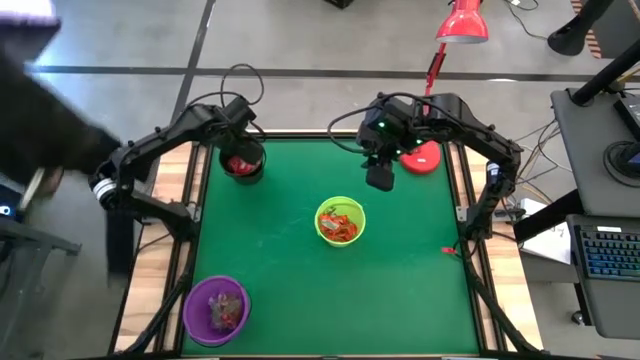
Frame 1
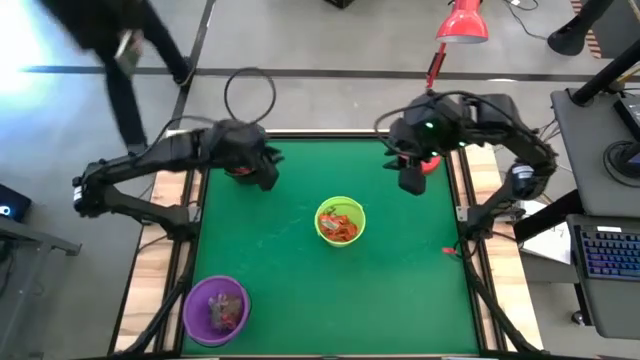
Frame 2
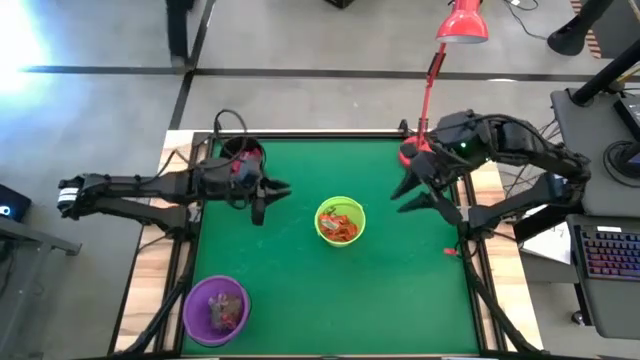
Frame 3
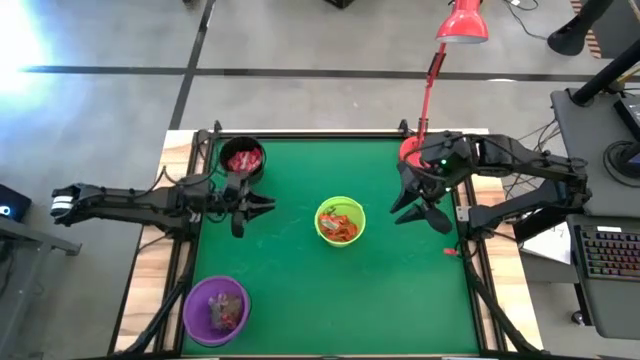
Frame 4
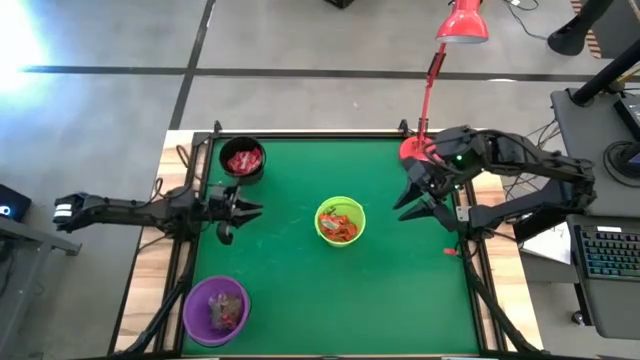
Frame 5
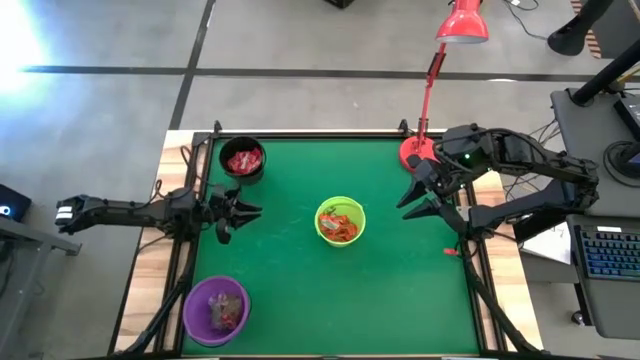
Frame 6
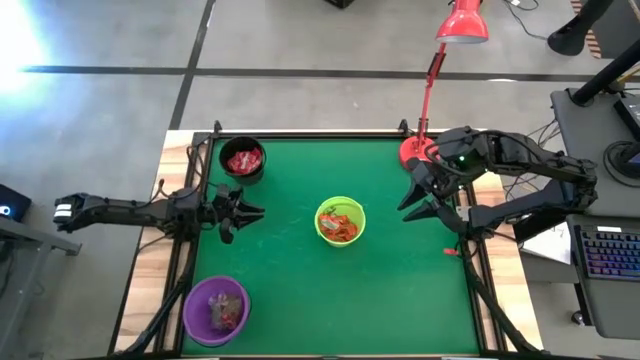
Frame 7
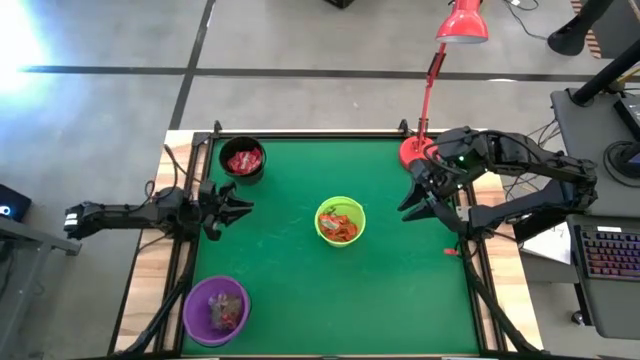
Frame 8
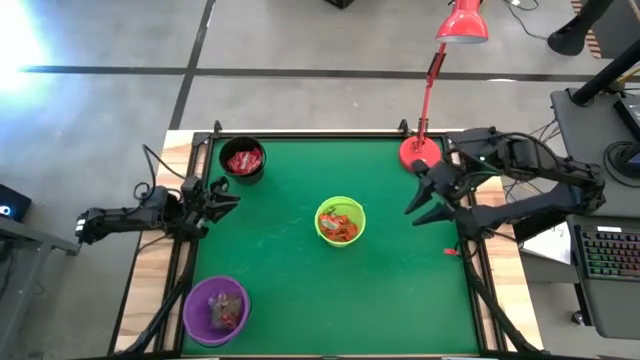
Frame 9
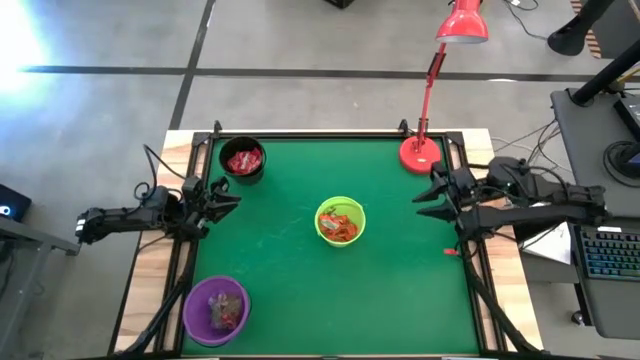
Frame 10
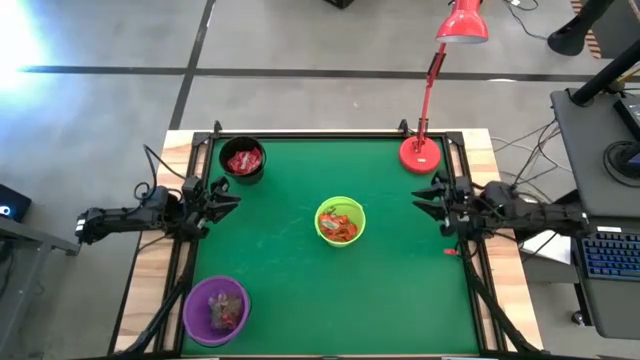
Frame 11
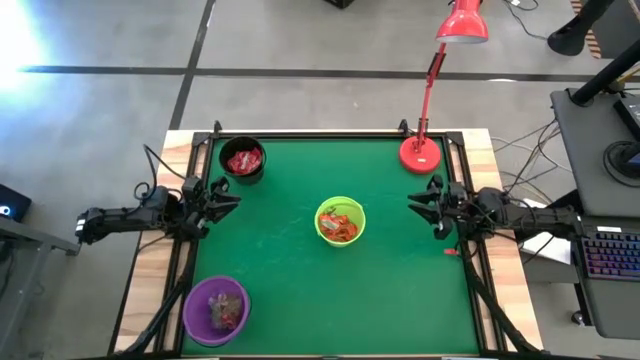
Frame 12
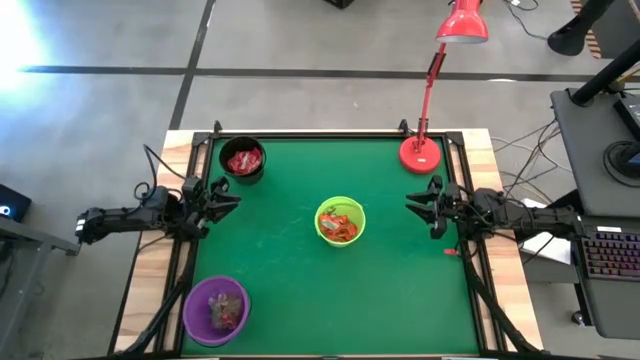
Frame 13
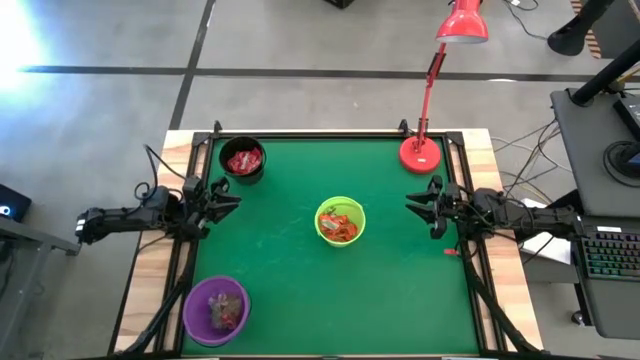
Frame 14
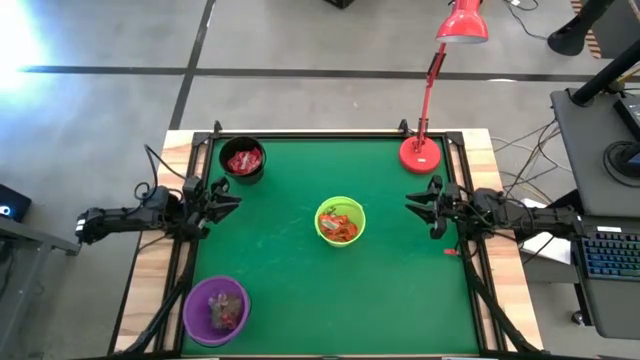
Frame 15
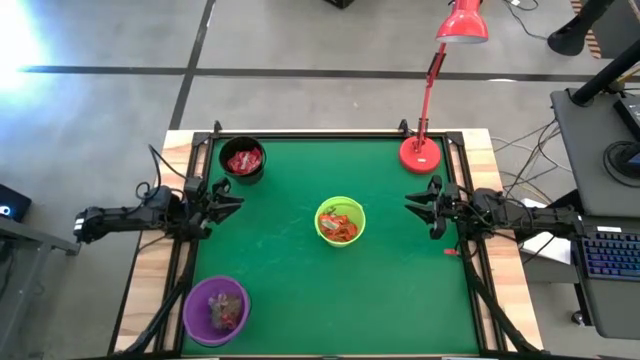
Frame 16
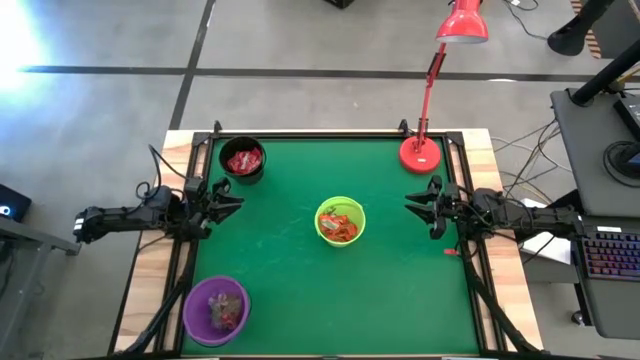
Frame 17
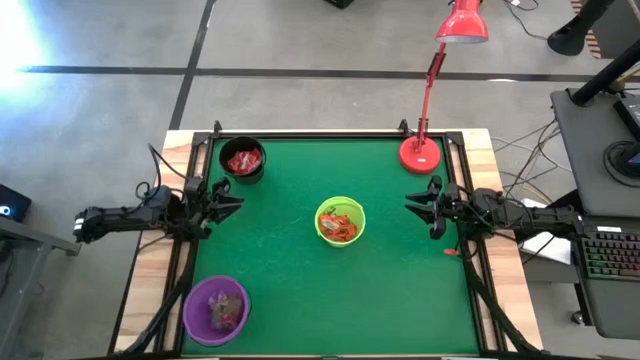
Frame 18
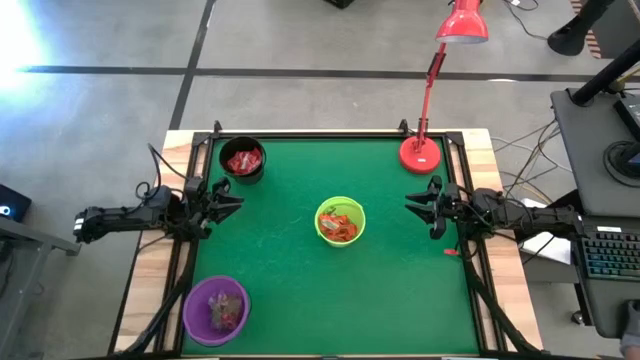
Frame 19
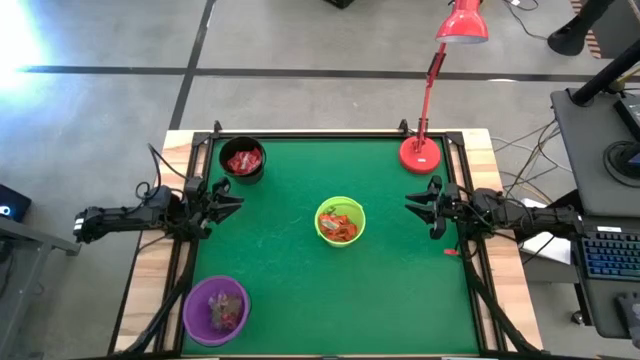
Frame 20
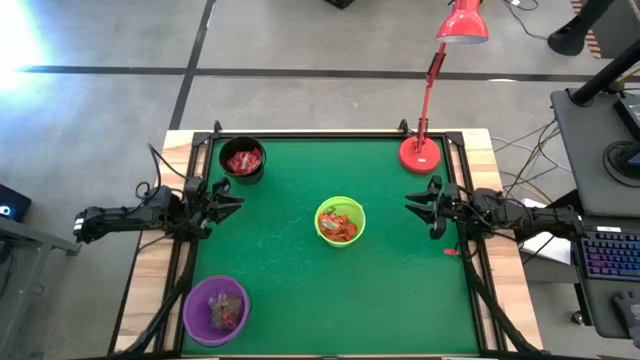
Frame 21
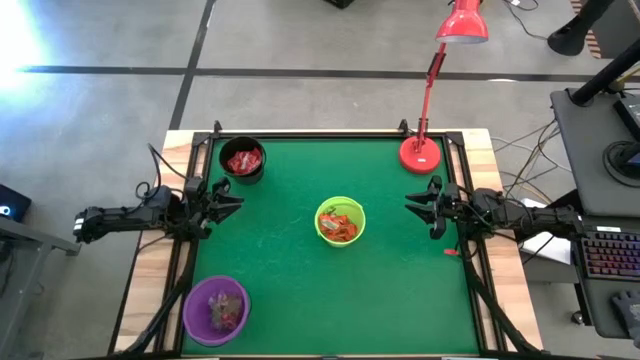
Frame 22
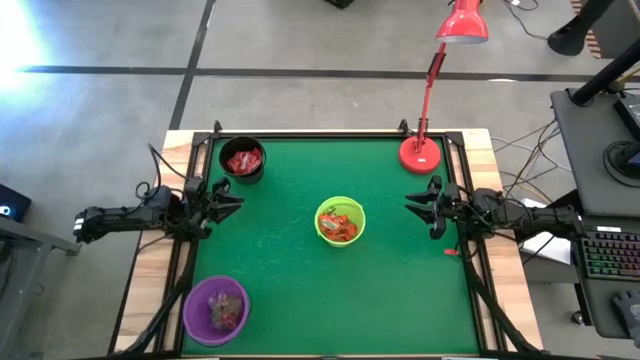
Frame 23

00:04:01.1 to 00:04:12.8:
Task: Sort candy
Return to Home Position

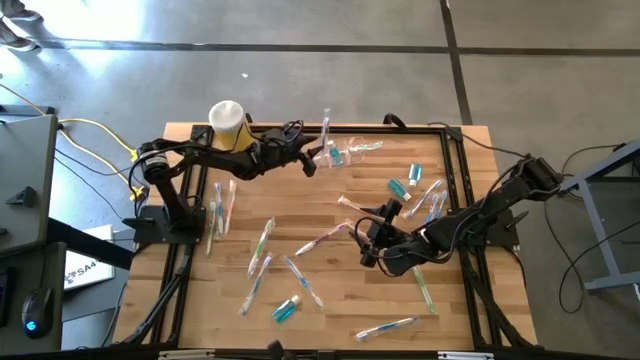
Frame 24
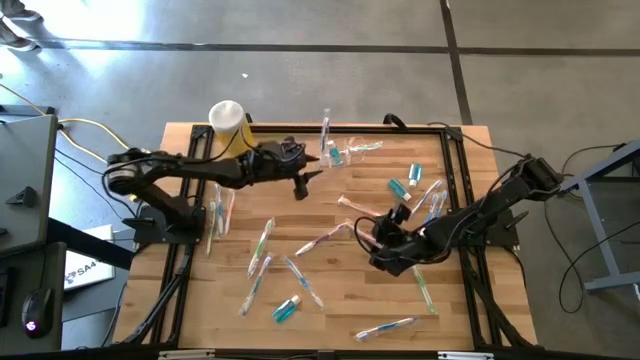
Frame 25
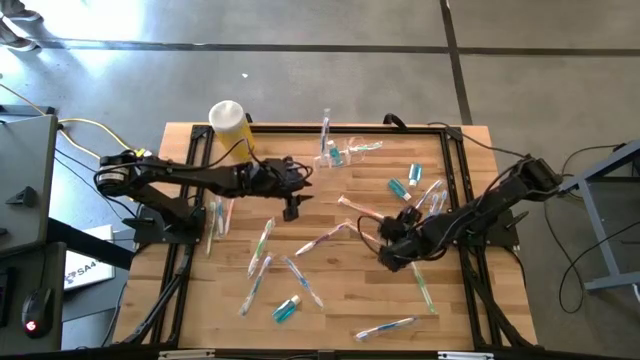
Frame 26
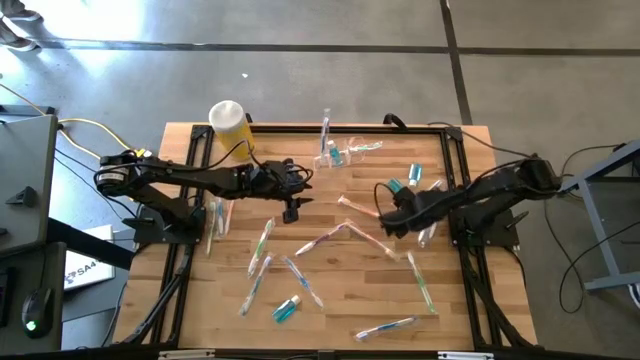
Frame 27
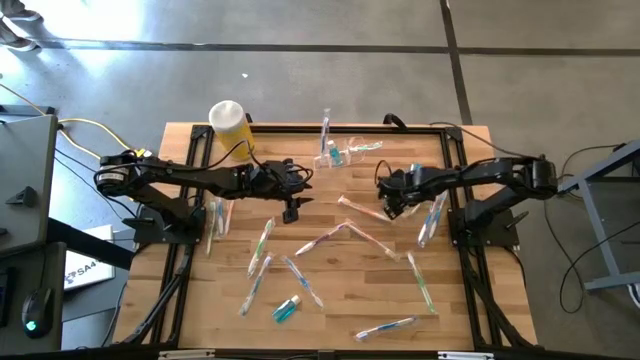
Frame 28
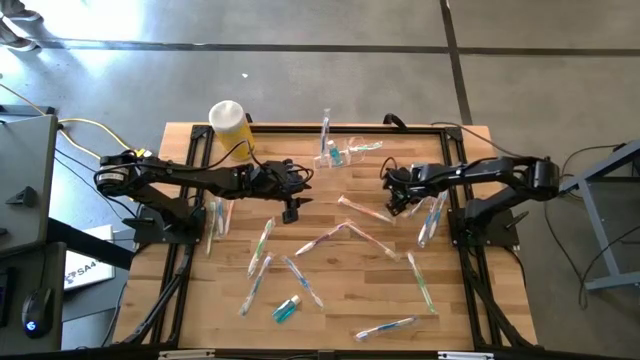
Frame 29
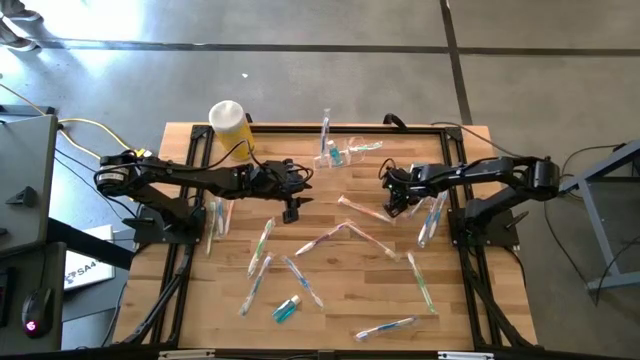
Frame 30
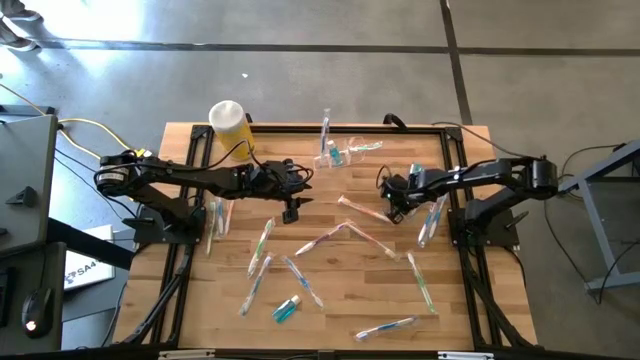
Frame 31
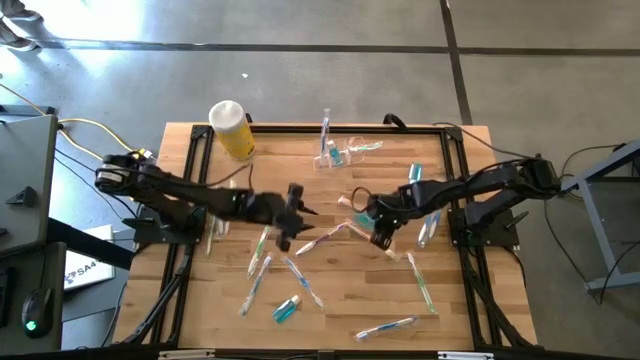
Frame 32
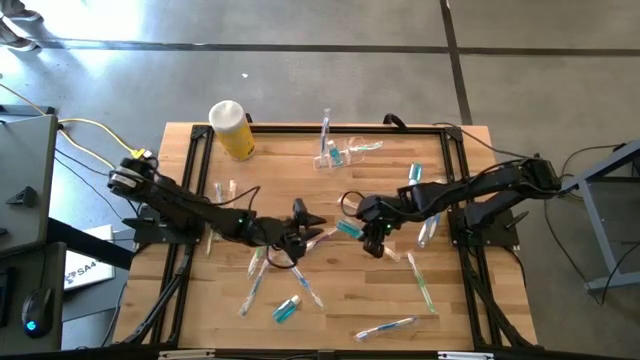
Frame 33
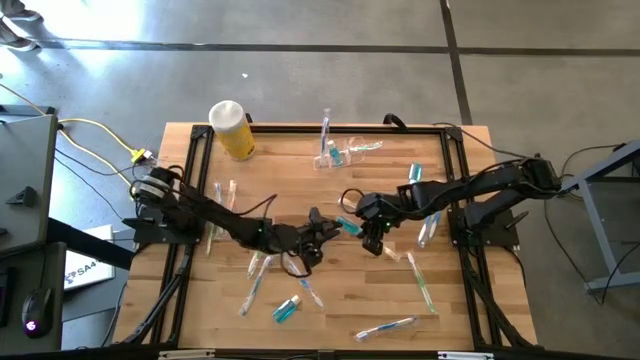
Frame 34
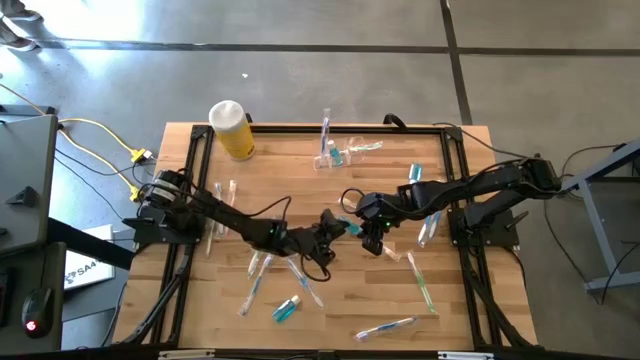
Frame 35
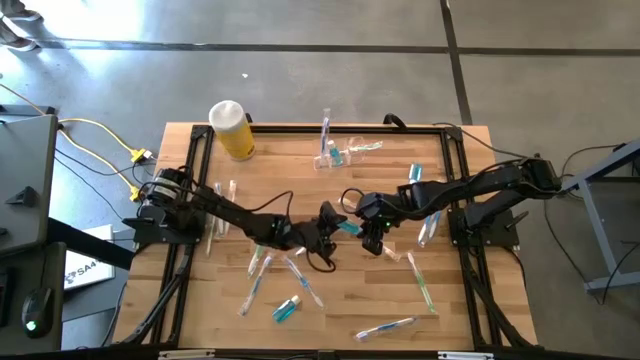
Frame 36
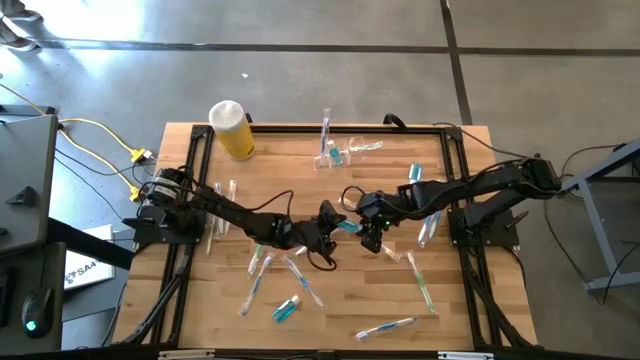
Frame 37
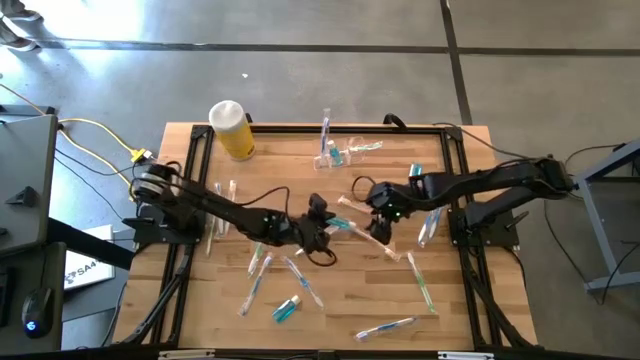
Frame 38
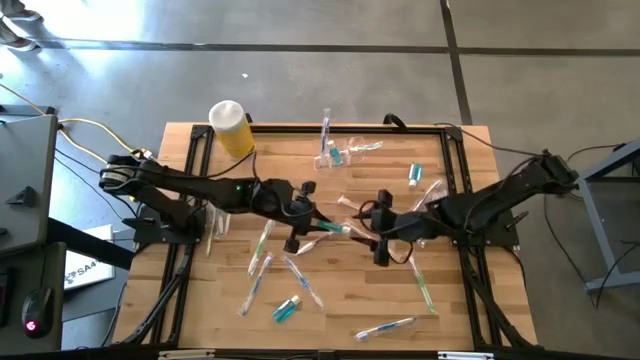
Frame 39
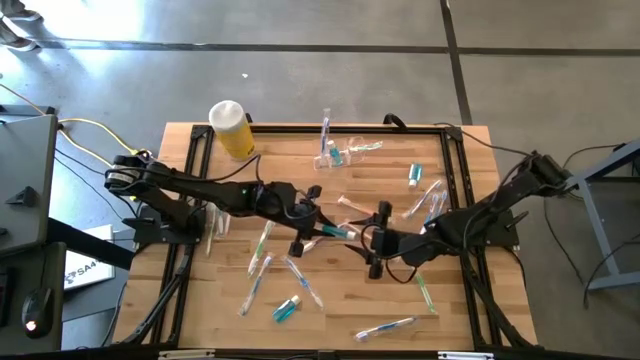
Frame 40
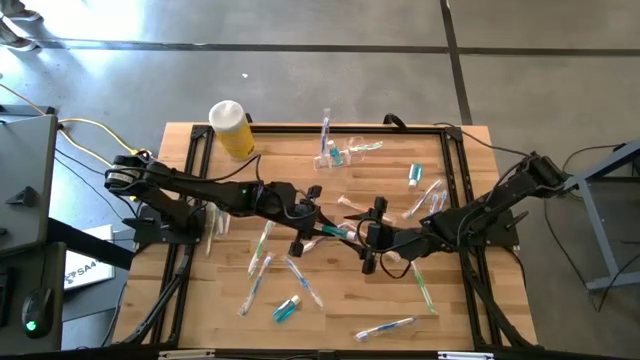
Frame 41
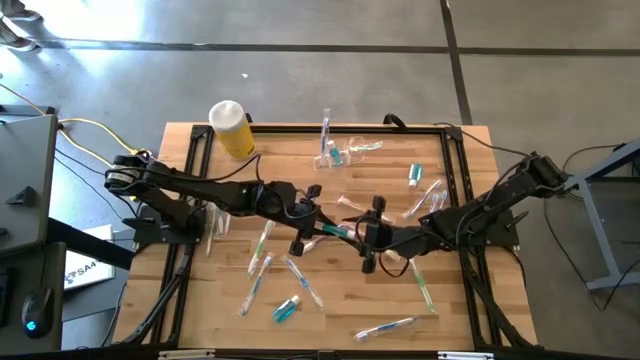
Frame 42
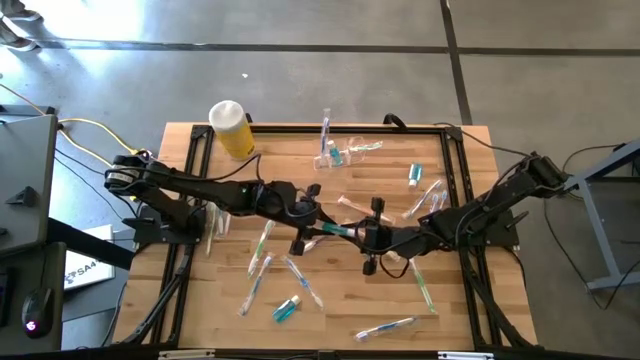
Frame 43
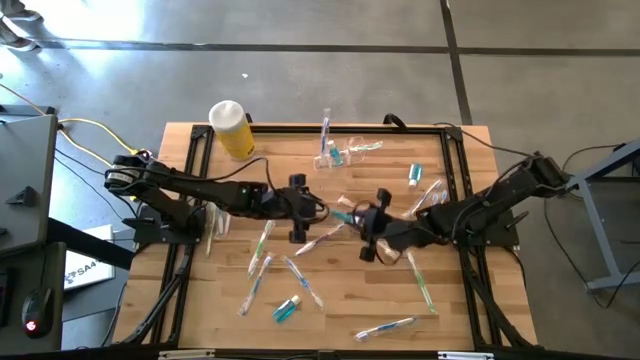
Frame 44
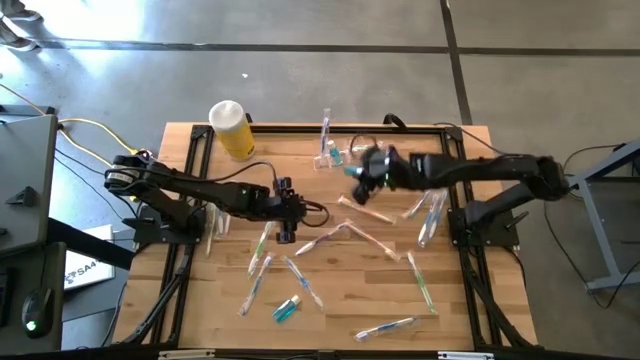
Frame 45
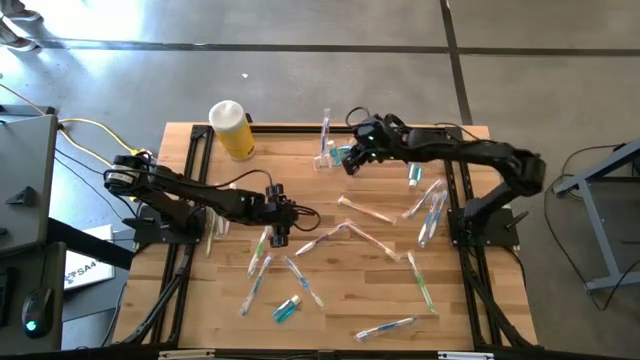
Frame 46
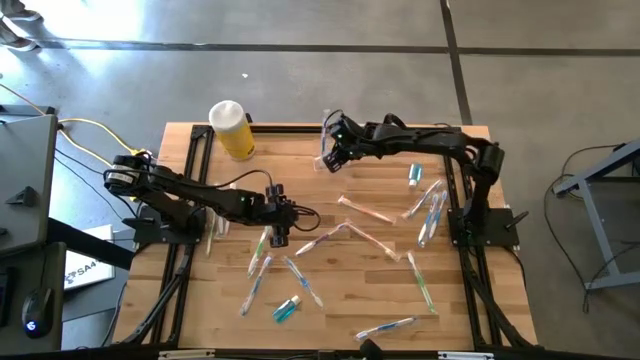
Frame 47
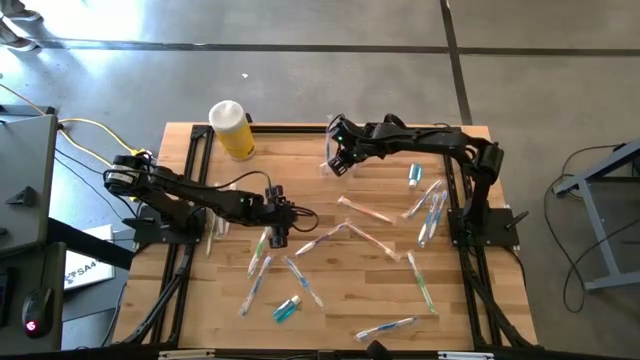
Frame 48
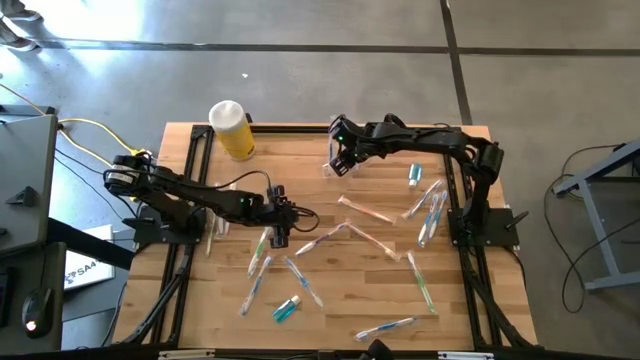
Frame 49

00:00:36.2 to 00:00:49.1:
Task: Pick & Place toothbrushing station
Put the blue mouthwash bottle into the transparent organizer
